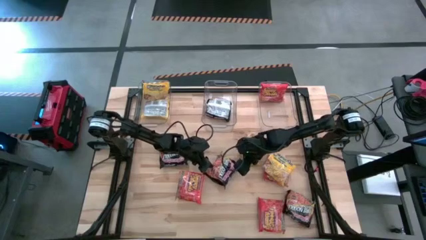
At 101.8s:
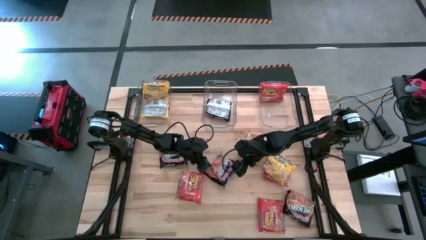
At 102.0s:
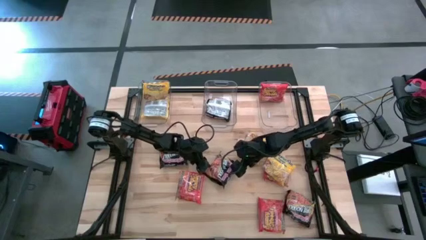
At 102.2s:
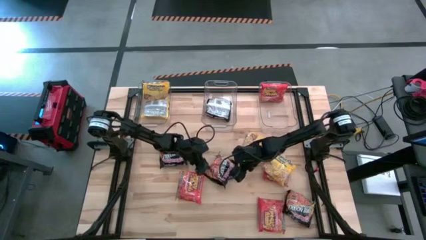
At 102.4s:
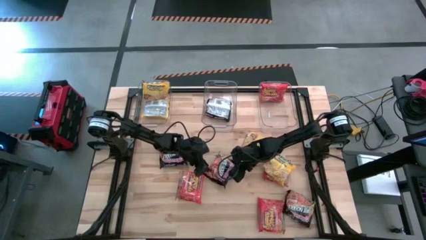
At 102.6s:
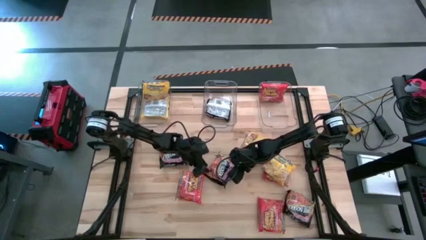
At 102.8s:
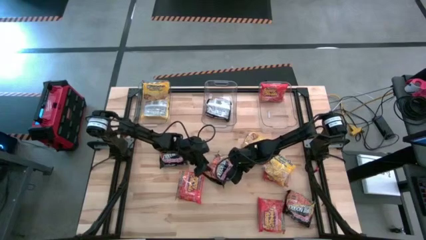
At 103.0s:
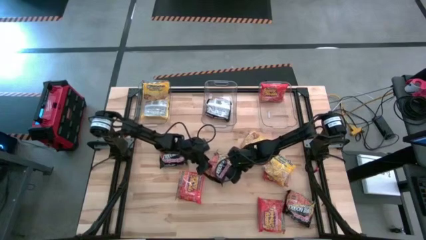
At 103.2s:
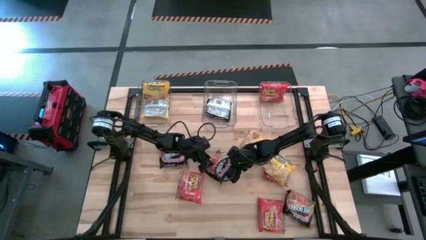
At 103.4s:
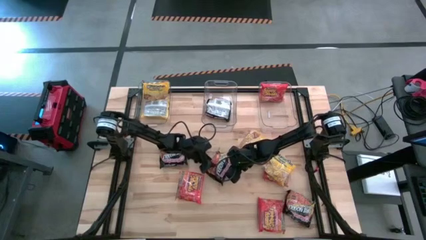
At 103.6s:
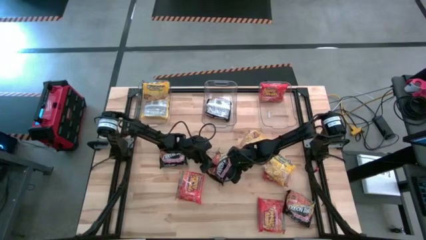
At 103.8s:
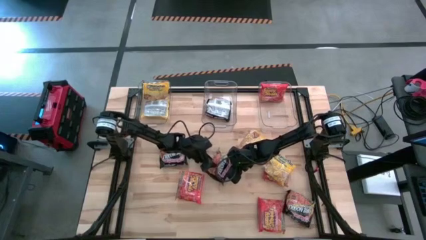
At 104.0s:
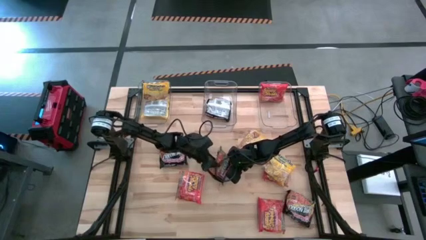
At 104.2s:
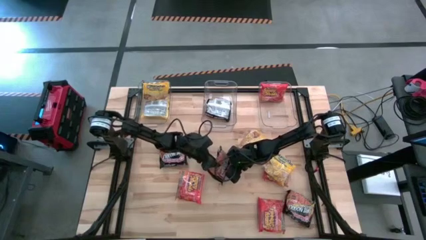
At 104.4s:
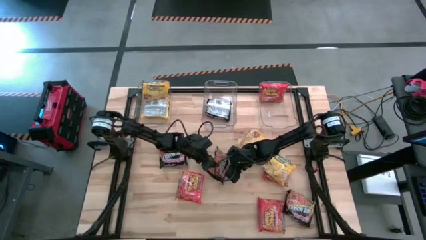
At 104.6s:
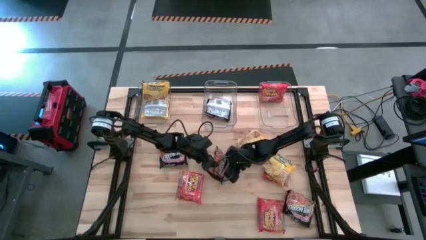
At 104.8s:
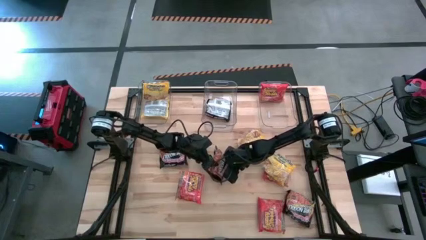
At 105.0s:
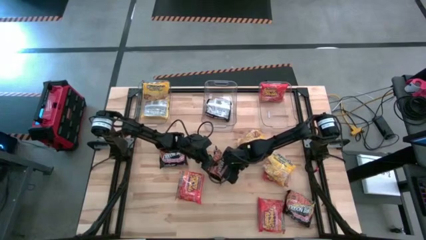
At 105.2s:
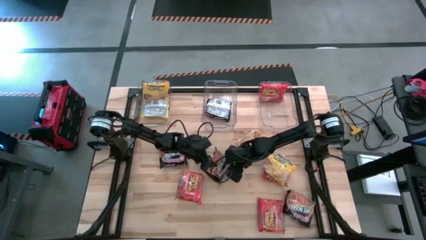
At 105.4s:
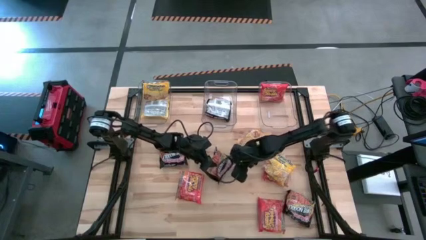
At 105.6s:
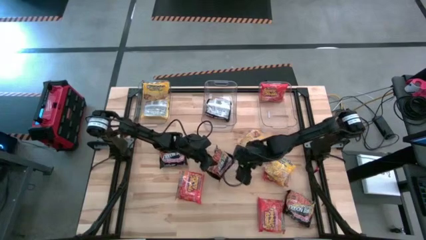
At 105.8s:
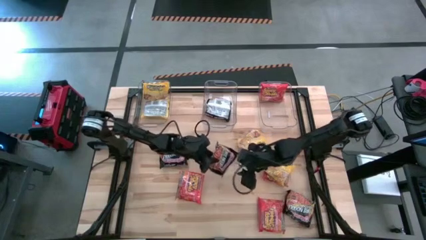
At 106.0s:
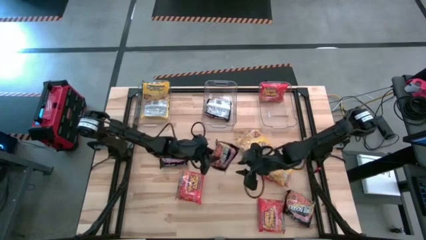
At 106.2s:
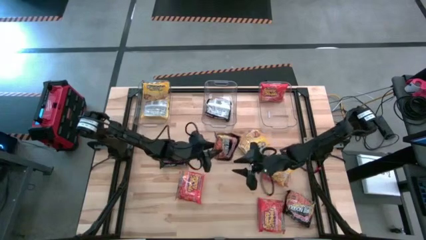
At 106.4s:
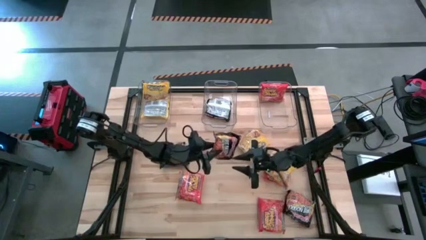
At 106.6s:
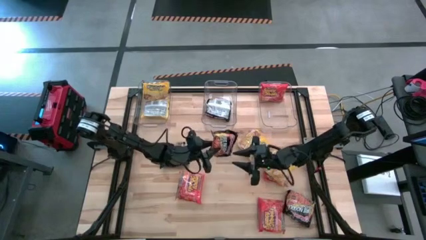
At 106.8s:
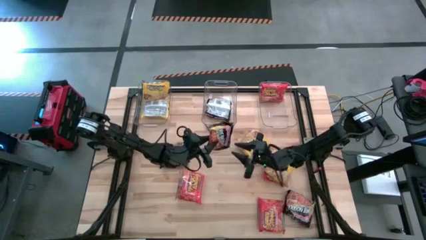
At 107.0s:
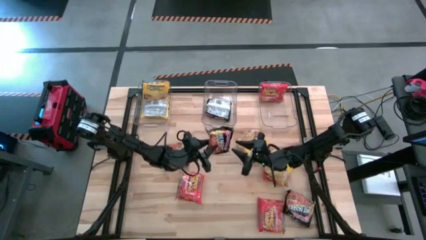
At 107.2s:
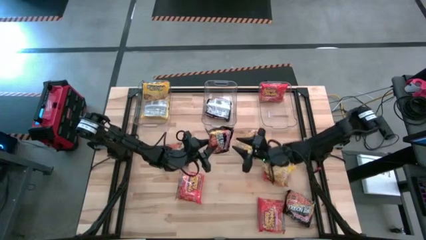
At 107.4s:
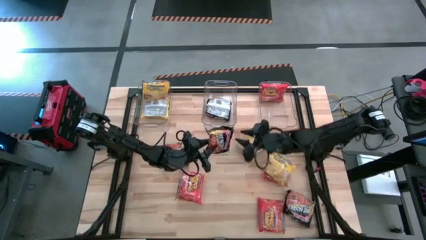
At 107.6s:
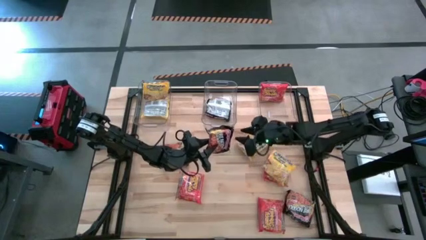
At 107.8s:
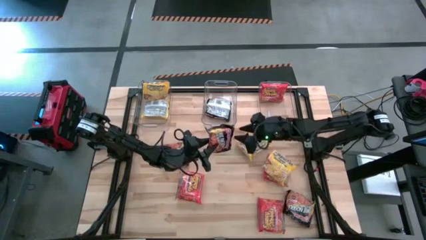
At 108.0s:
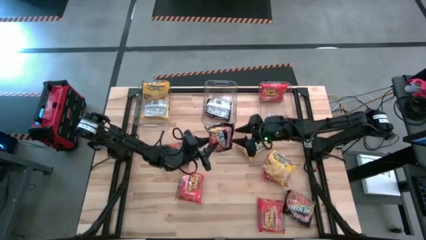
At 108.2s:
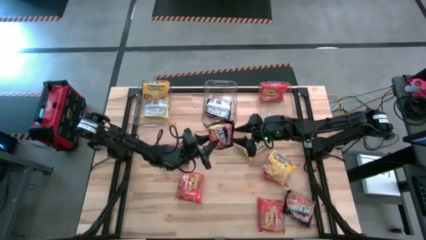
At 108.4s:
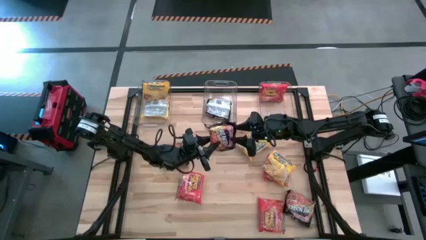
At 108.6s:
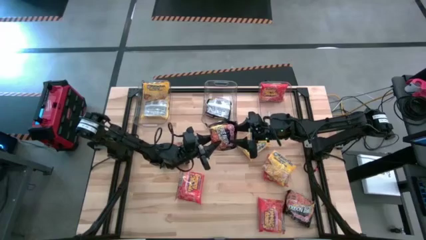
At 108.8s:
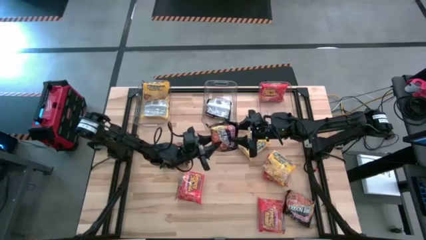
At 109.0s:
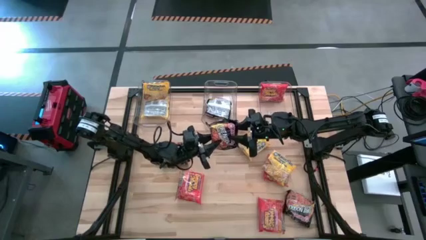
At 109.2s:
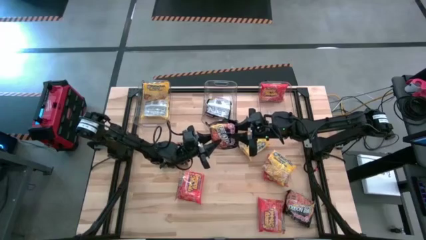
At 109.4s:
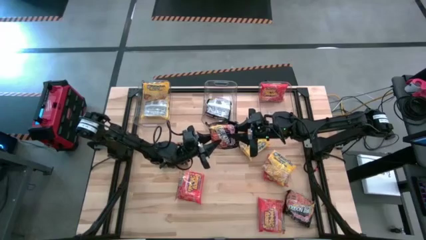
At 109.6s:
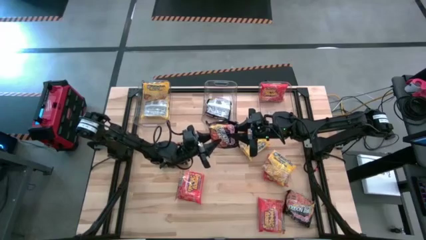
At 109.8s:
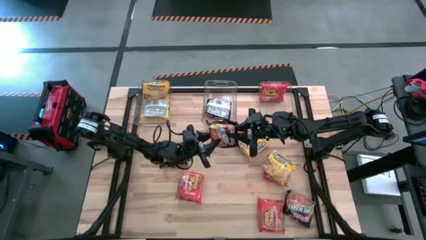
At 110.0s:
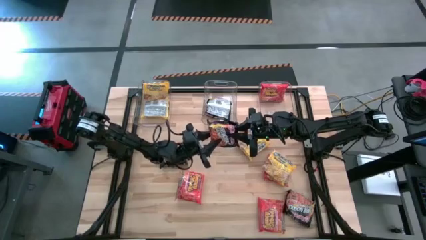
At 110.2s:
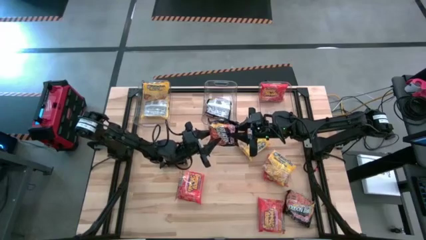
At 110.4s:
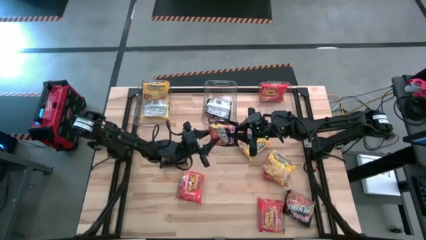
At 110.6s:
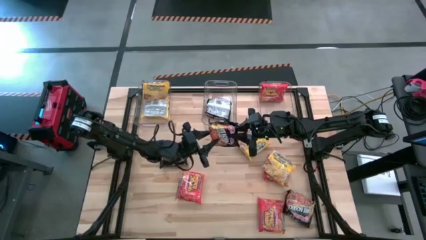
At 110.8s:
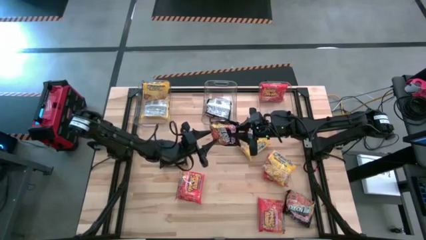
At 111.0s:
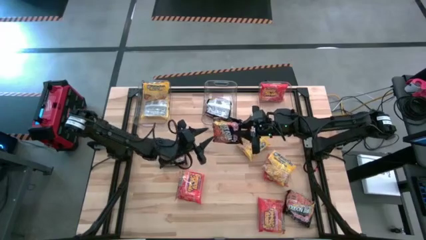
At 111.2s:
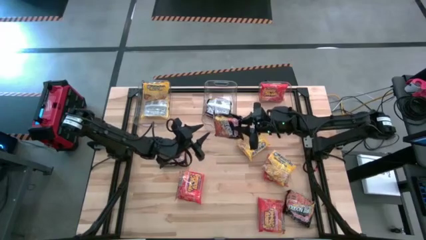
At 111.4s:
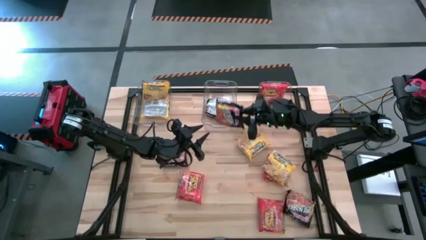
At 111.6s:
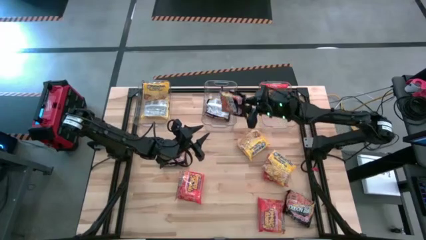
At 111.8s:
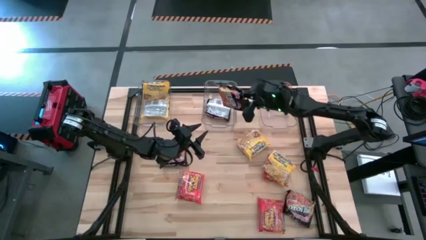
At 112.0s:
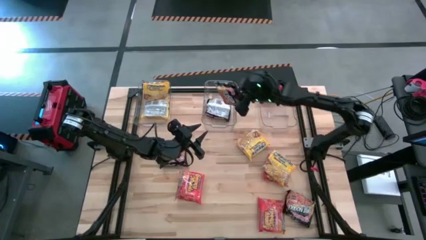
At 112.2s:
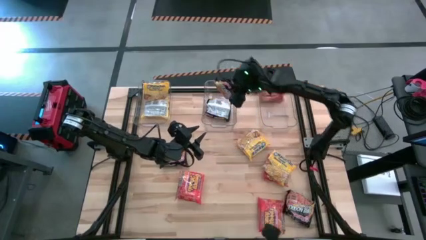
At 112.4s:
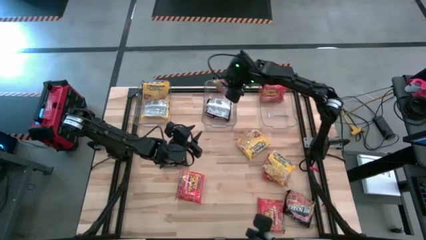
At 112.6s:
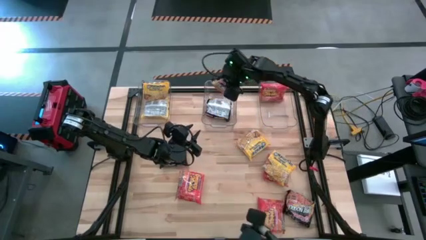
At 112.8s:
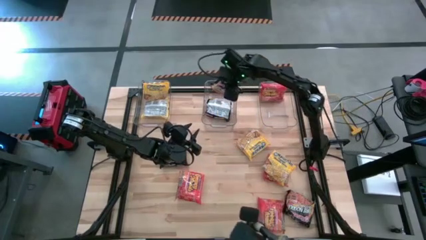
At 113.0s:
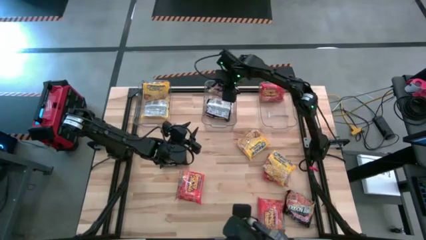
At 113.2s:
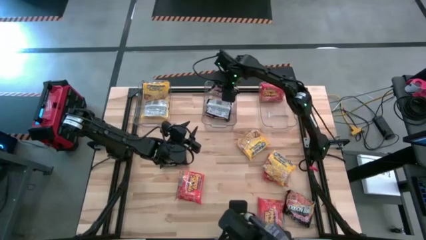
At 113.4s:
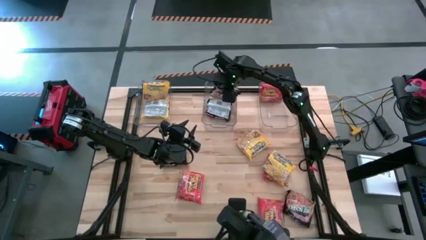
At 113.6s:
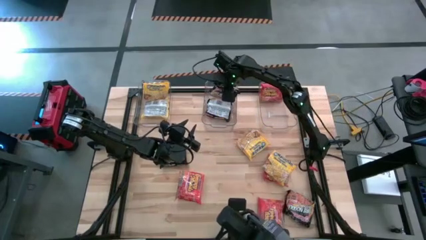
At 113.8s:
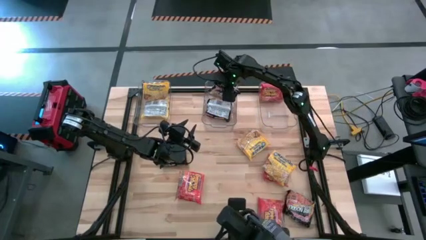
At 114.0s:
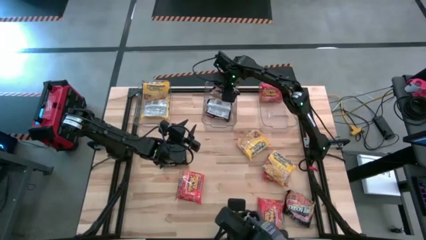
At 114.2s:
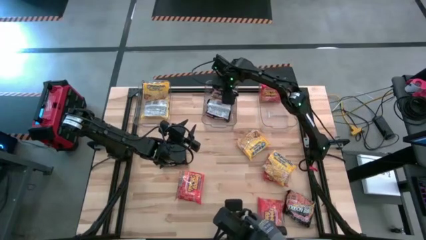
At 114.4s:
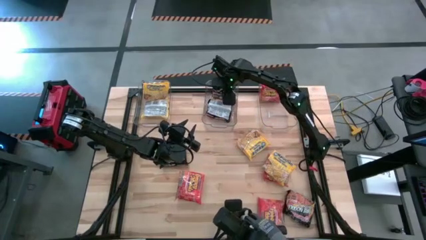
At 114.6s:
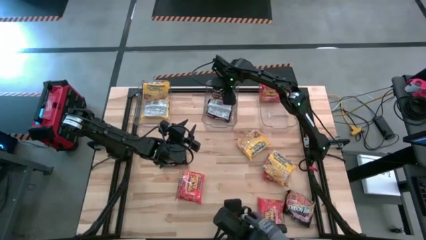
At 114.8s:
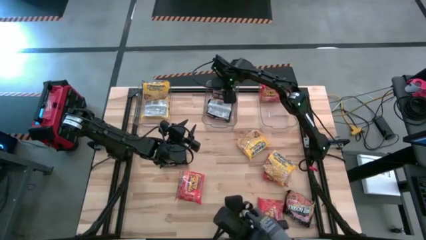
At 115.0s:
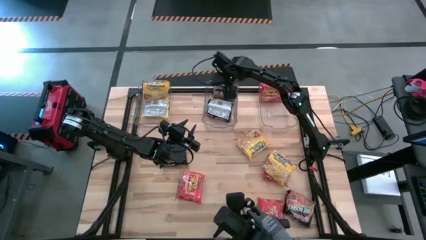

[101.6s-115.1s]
Task: Sort Maruchan noodles
Put the black noodle pack into the middle transparent bin
